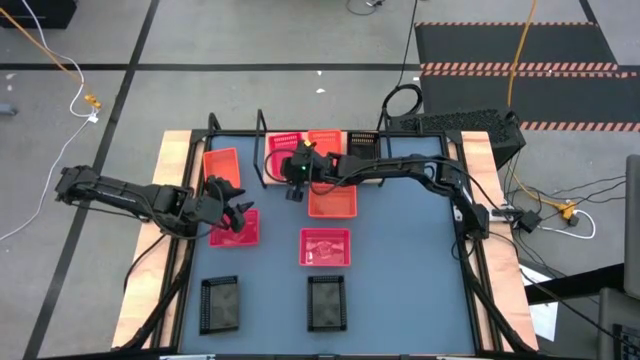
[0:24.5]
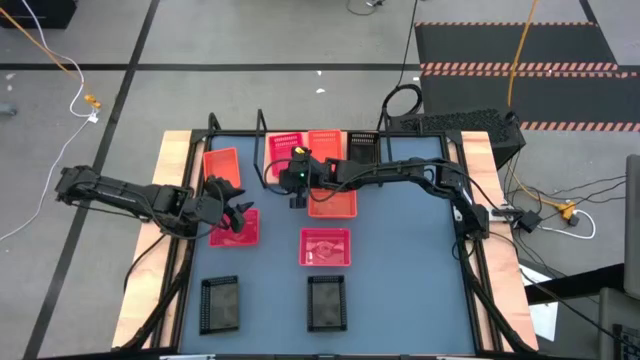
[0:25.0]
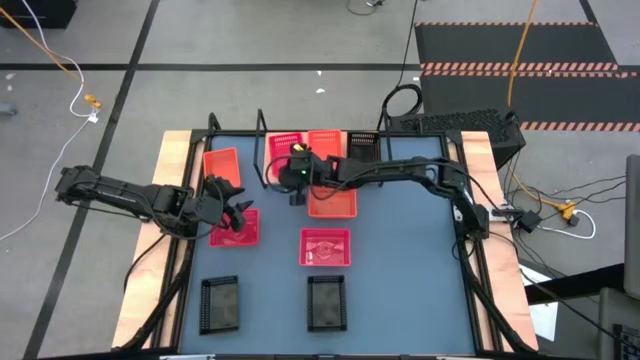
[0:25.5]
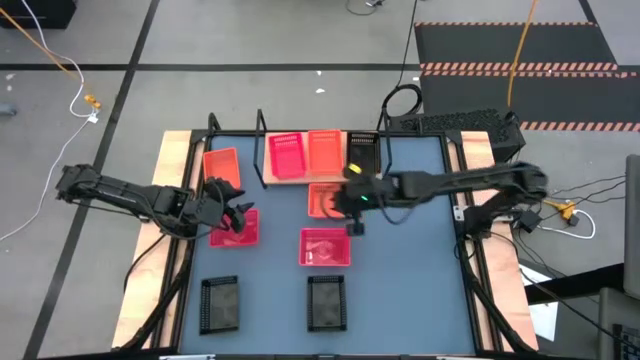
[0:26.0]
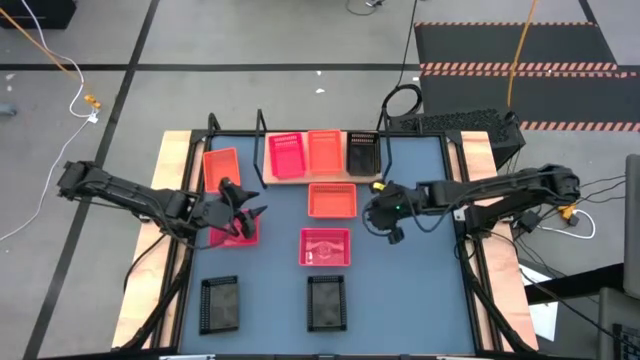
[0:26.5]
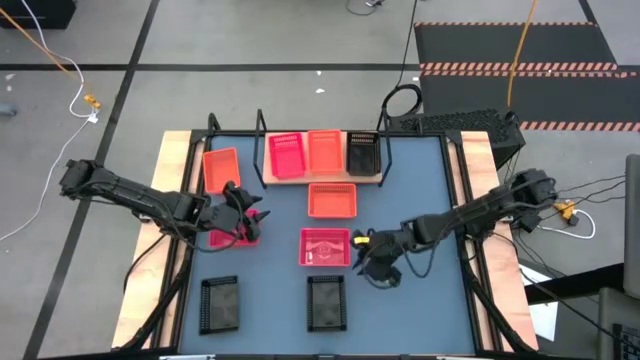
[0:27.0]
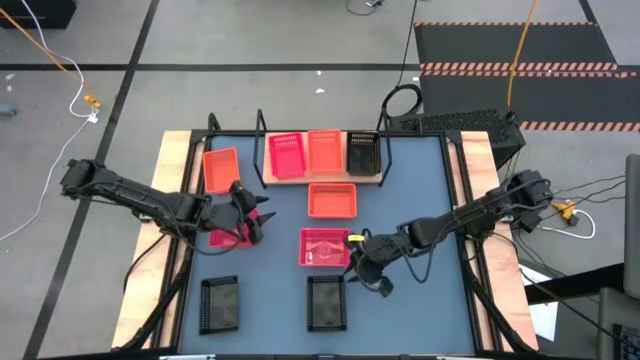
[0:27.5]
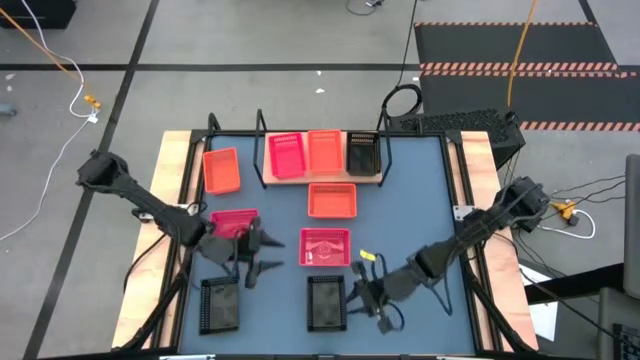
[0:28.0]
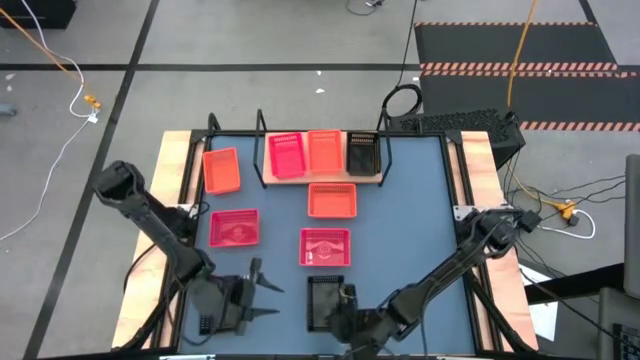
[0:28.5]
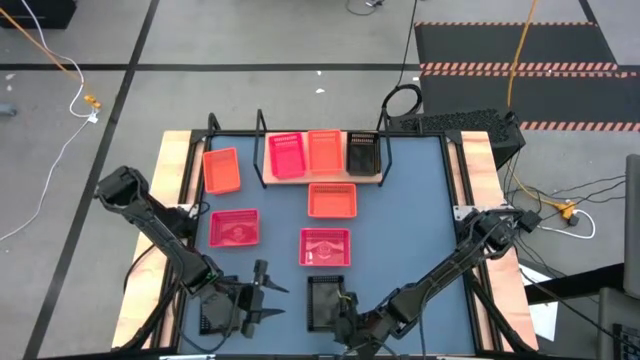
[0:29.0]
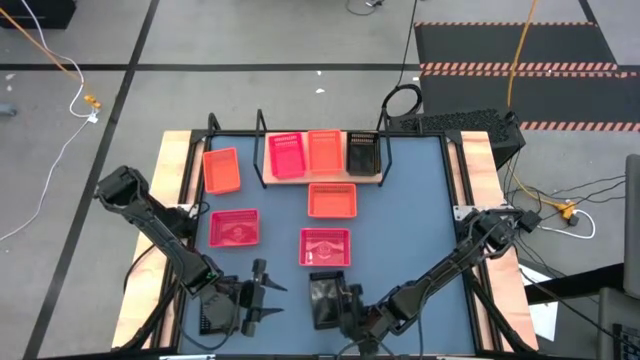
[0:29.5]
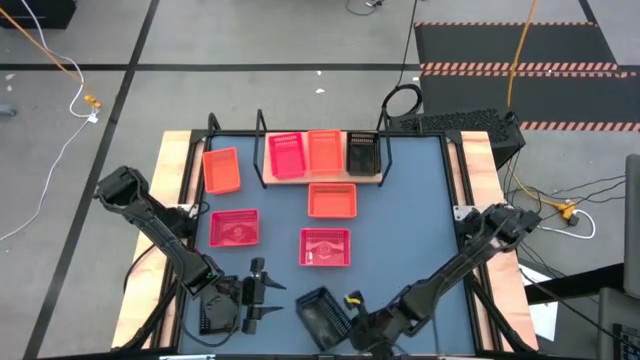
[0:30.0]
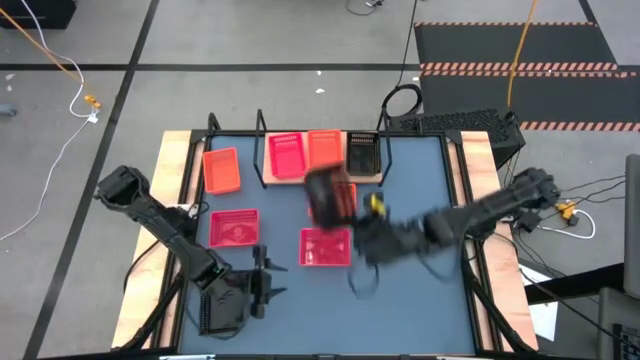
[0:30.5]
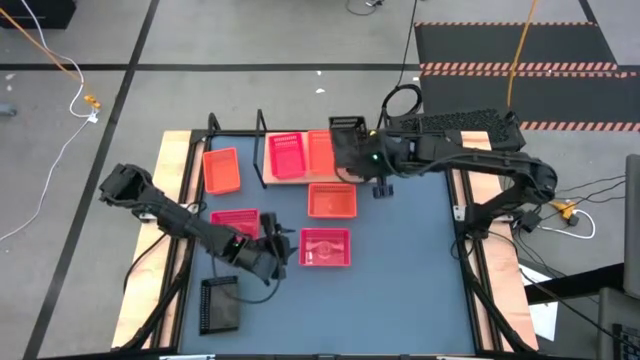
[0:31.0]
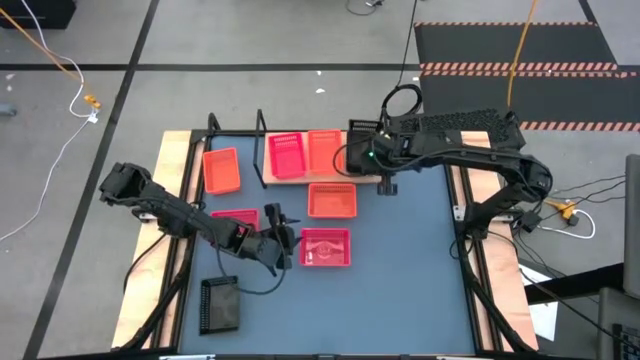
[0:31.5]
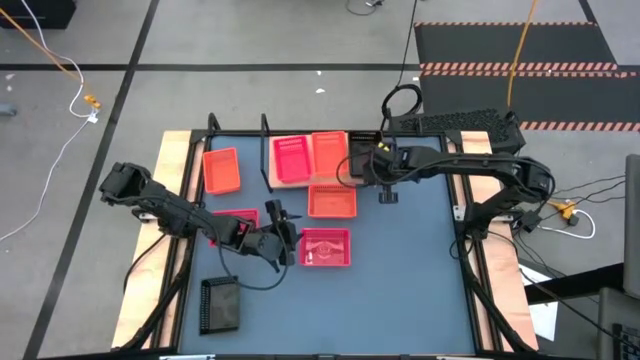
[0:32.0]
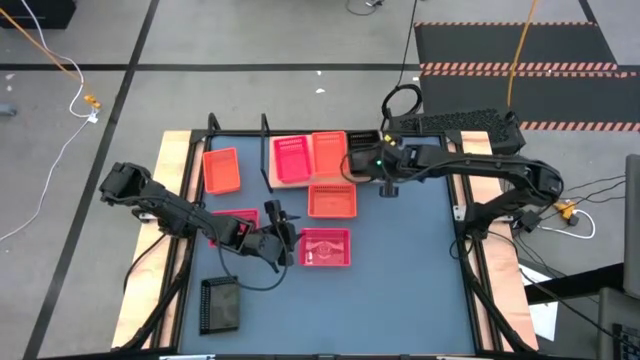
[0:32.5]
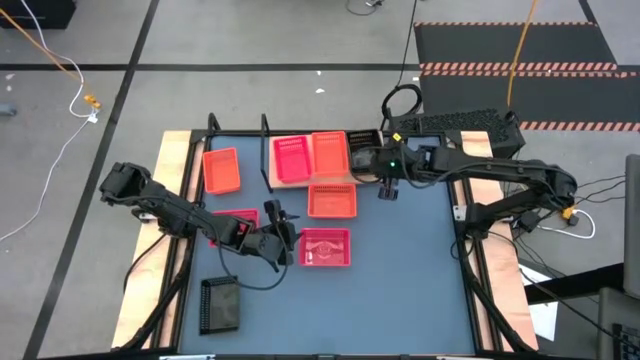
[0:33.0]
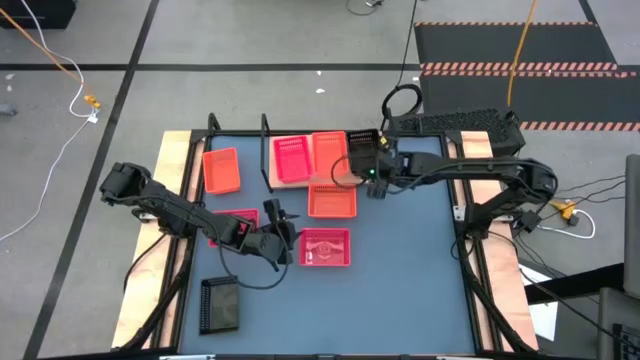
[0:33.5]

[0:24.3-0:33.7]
Task: Stack baskets on shelf by color
Stack the right black basket on top of the black basket on the shelf

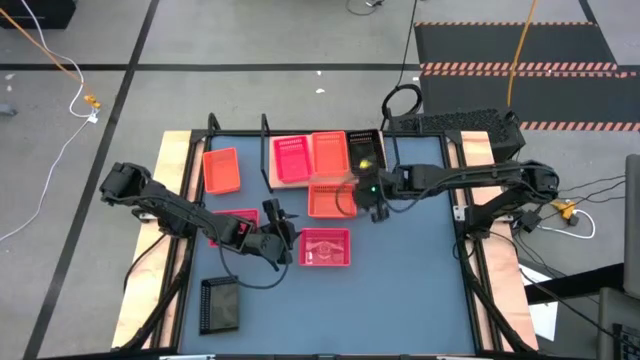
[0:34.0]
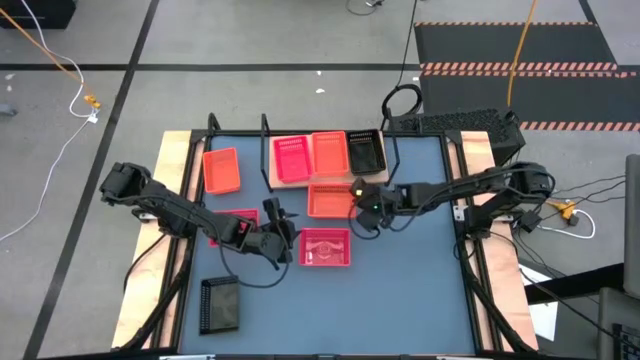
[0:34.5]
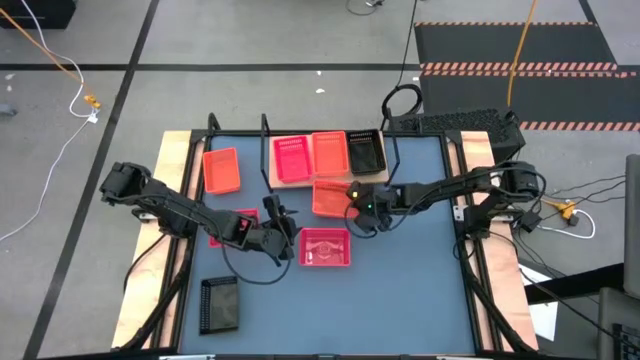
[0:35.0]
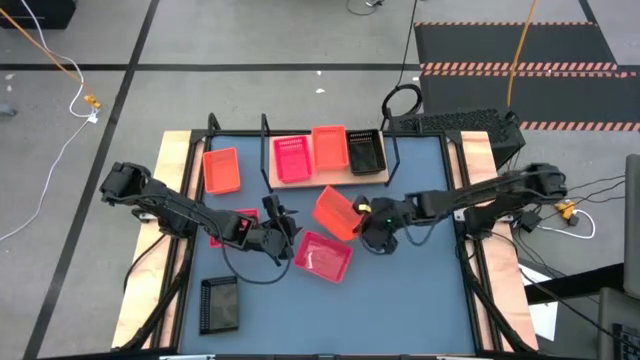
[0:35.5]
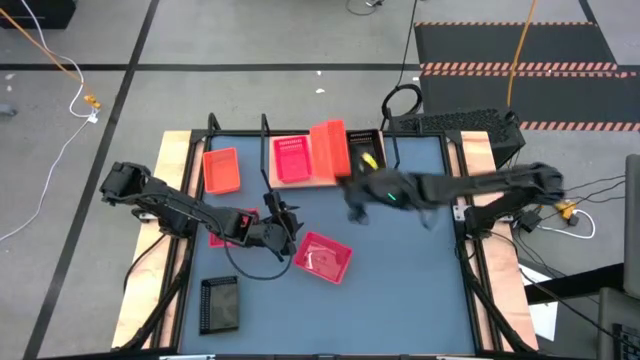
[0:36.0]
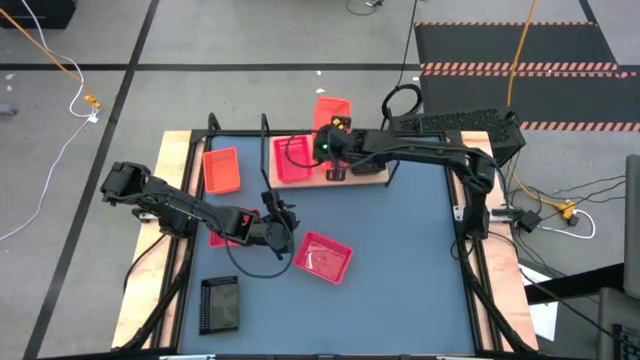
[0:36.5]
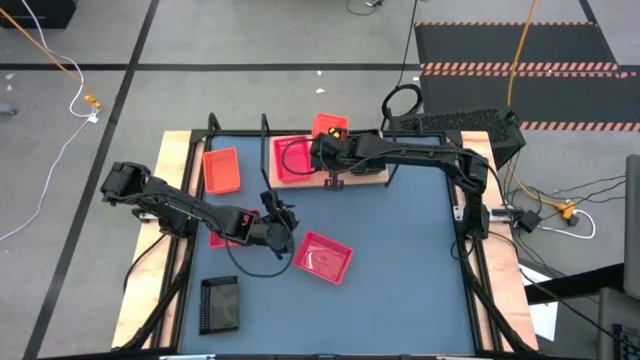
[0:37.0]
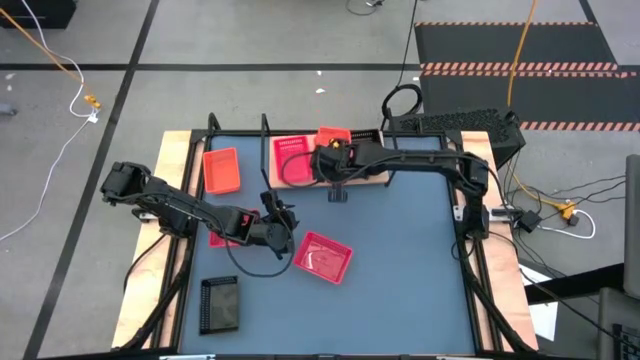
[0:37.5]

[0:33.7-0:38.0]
Stack the right orange basket on top of the orange basket on the shelf

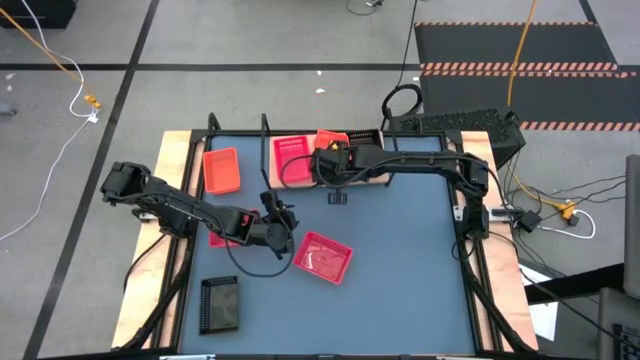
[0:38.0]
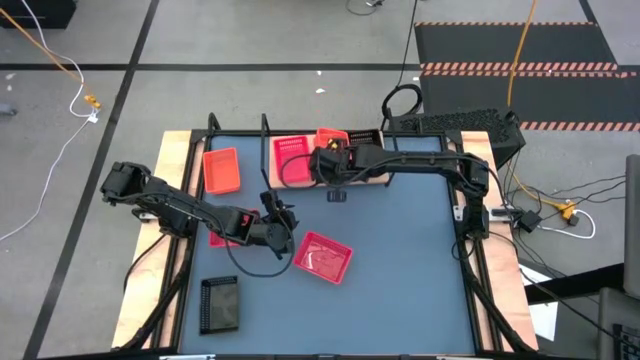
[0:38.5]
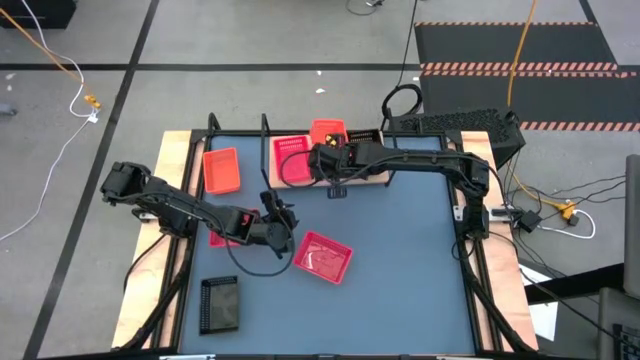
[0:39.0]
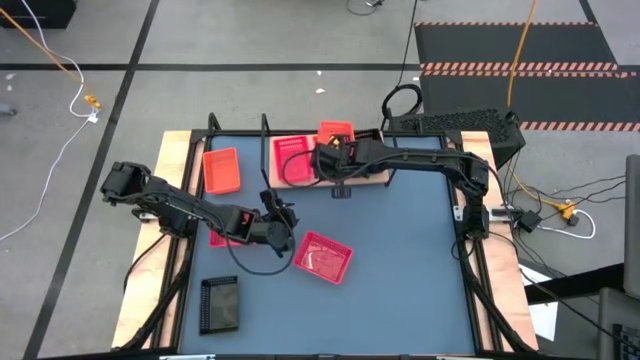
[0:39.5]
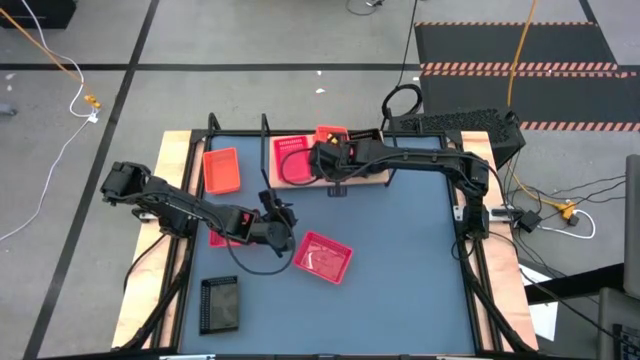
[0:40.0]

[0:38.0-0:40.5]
Stack the right orange basket on top of the orange basket on the shelf

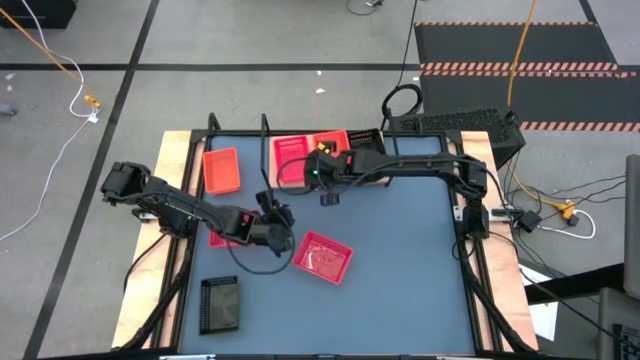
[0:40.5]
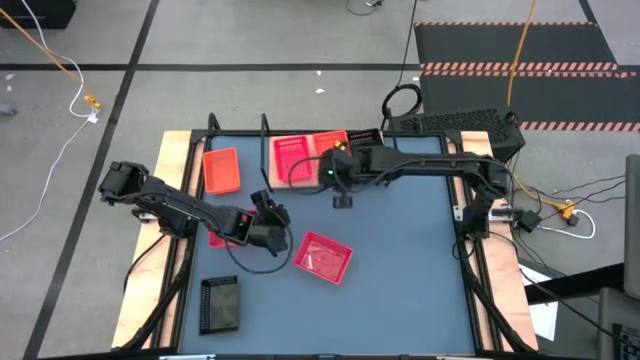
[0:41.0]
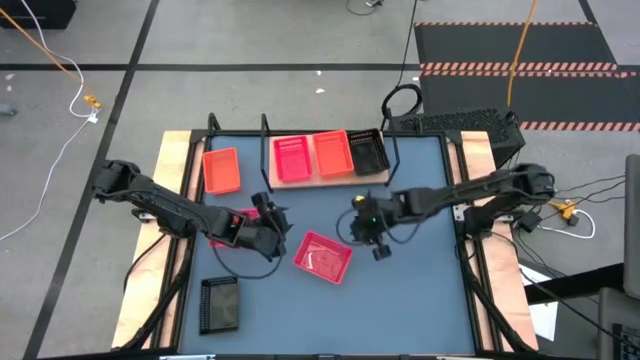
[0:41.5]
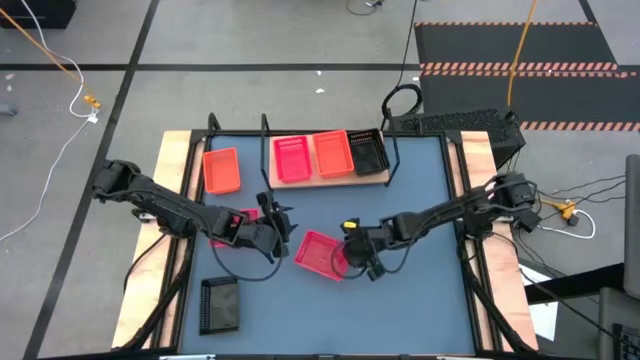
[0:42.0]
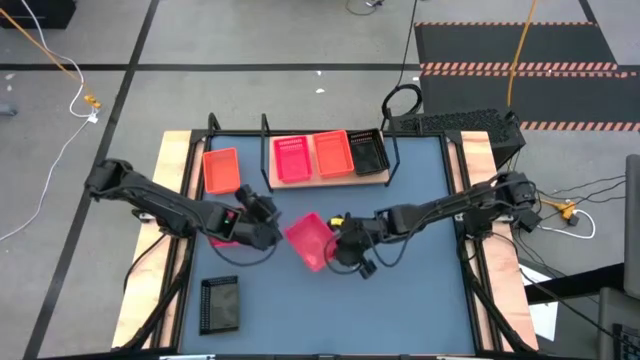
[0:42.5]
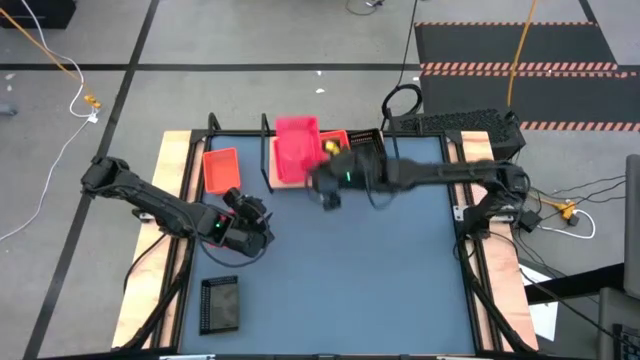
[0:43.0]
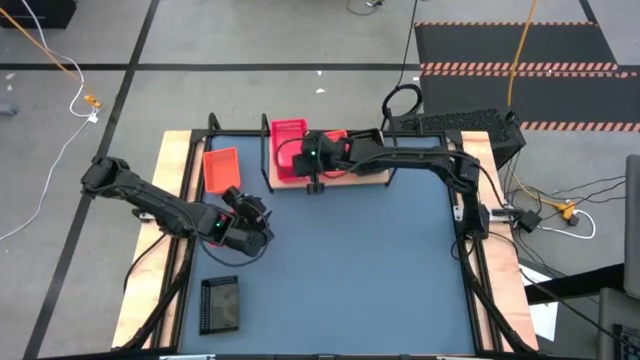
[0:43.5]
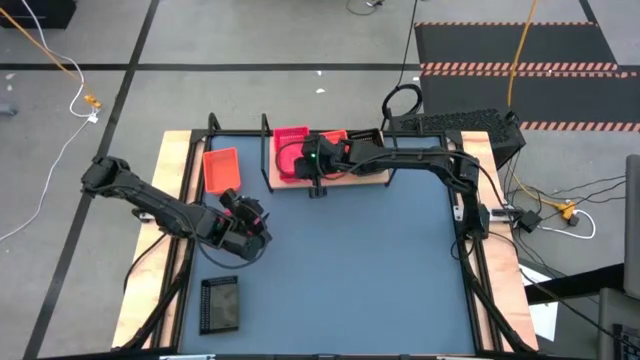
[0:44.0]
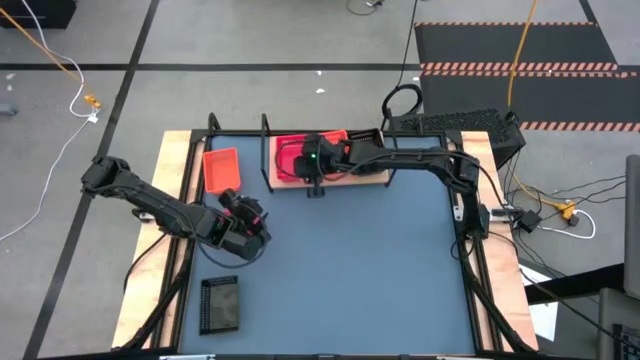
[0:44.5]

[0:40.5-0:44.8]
Stack the right red basket on top of the red basket on the shelf
